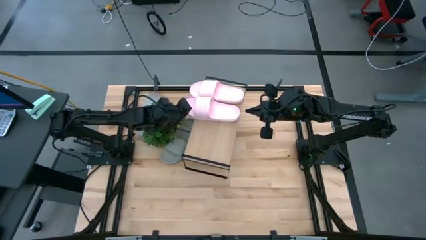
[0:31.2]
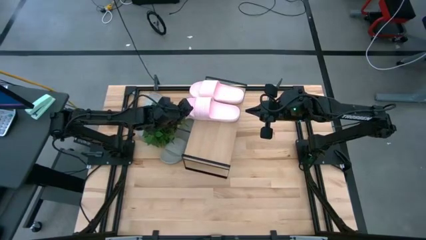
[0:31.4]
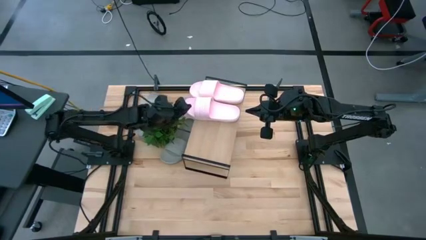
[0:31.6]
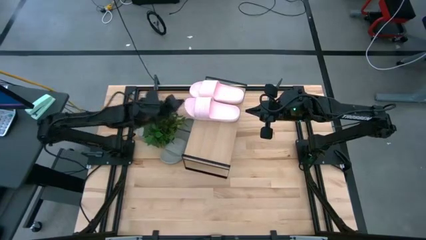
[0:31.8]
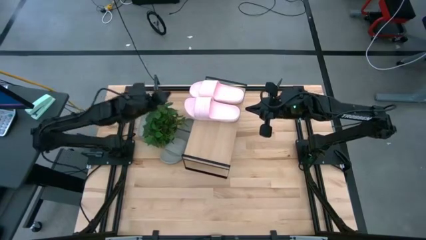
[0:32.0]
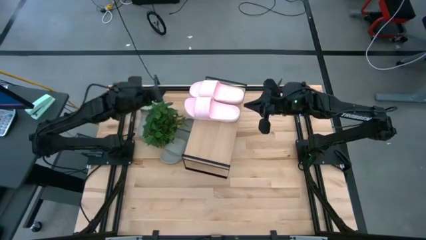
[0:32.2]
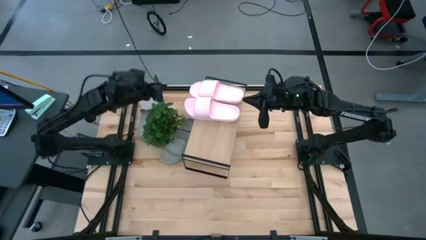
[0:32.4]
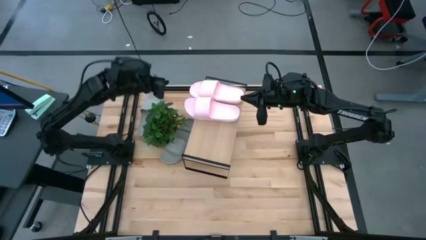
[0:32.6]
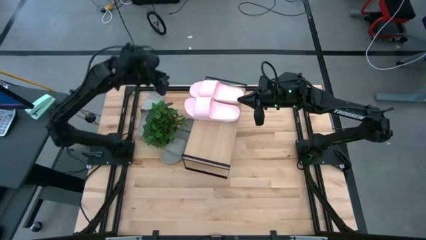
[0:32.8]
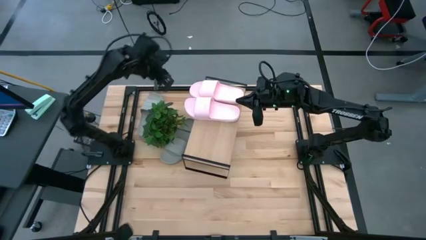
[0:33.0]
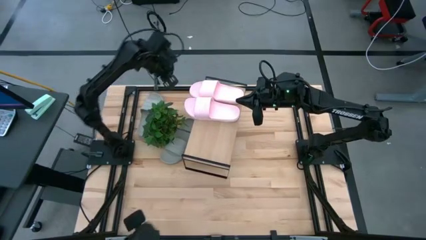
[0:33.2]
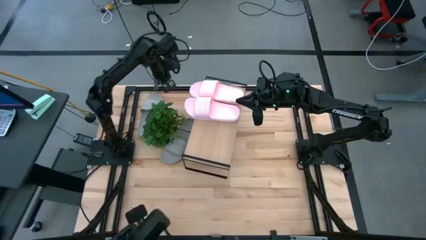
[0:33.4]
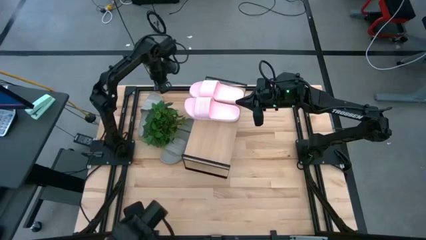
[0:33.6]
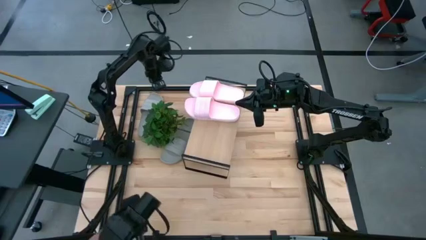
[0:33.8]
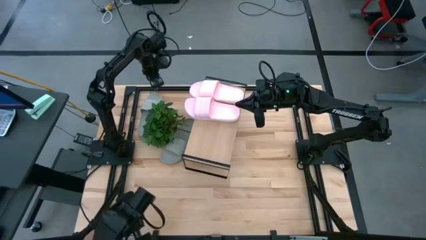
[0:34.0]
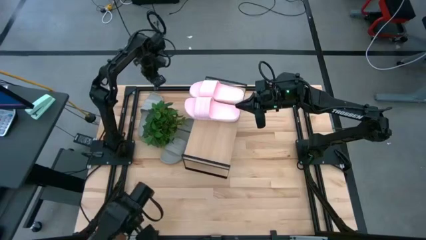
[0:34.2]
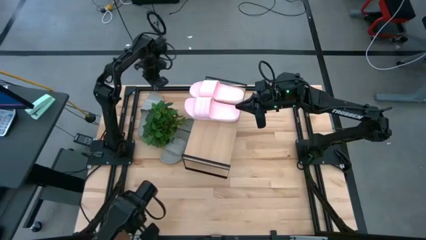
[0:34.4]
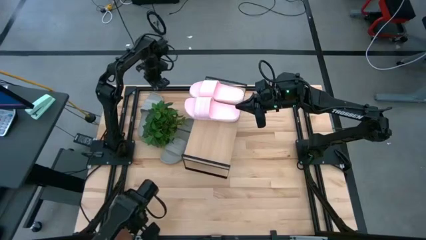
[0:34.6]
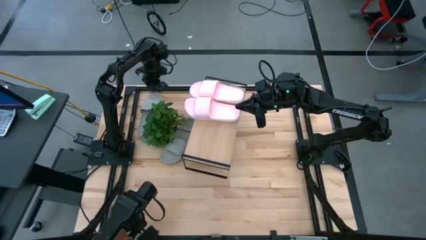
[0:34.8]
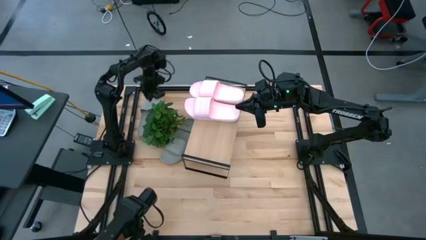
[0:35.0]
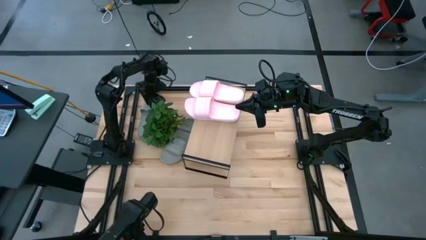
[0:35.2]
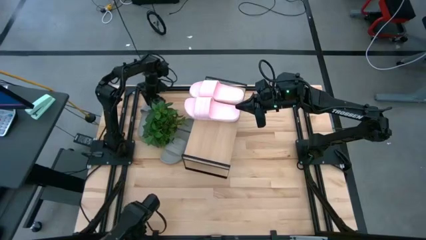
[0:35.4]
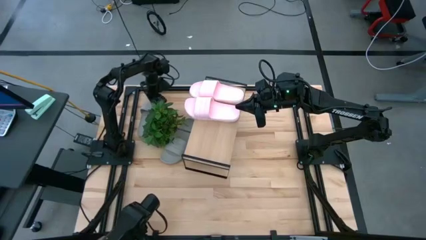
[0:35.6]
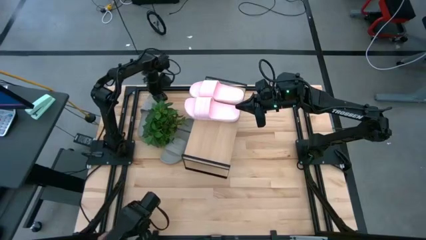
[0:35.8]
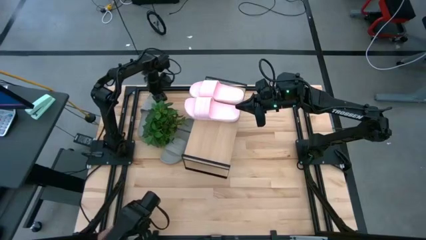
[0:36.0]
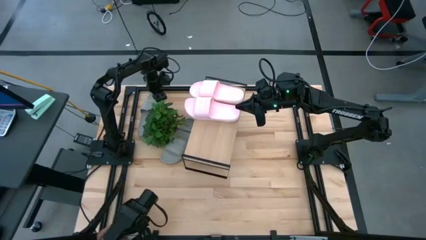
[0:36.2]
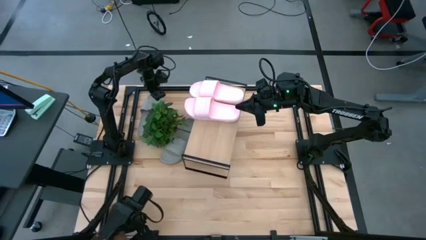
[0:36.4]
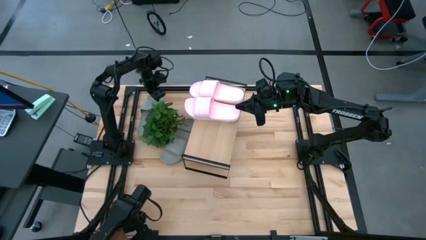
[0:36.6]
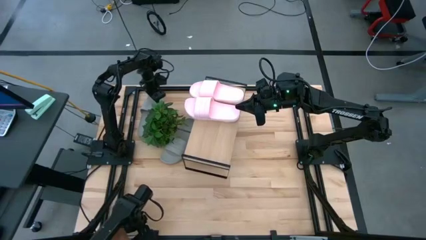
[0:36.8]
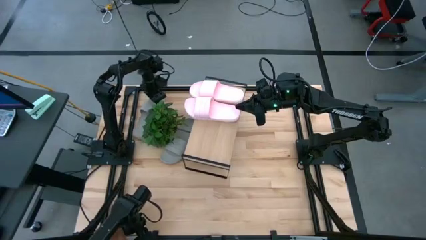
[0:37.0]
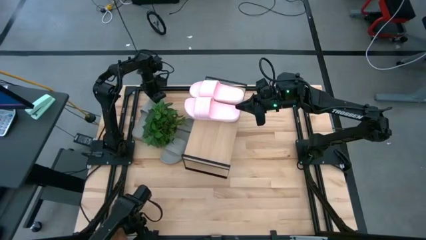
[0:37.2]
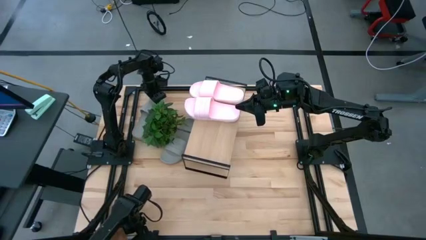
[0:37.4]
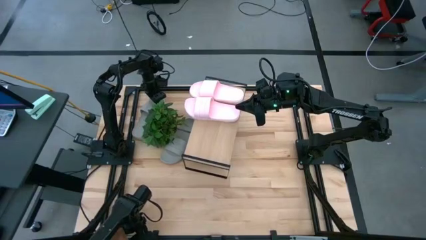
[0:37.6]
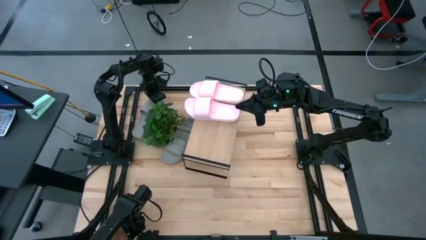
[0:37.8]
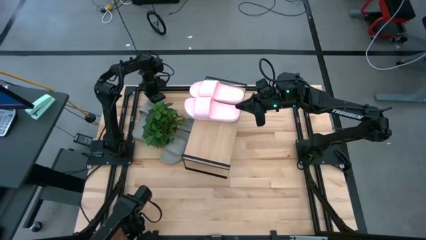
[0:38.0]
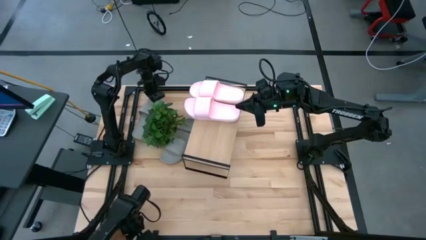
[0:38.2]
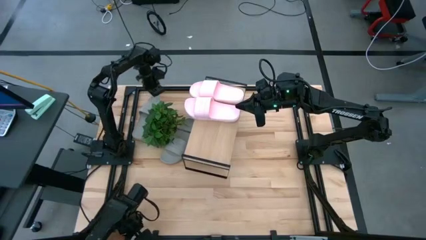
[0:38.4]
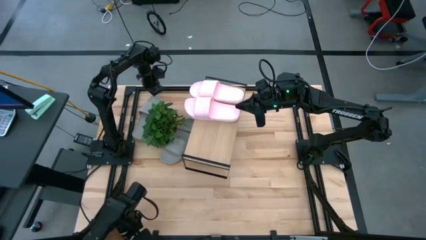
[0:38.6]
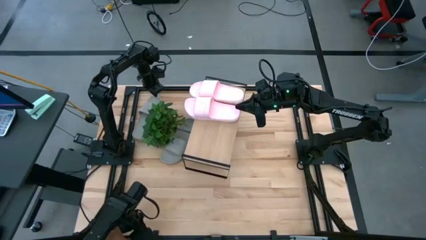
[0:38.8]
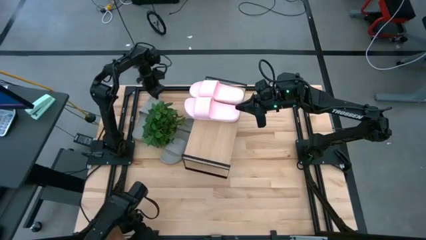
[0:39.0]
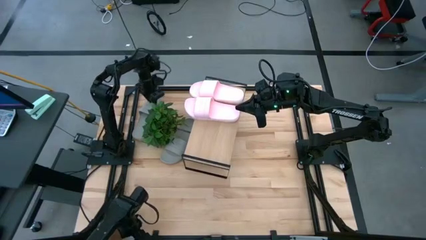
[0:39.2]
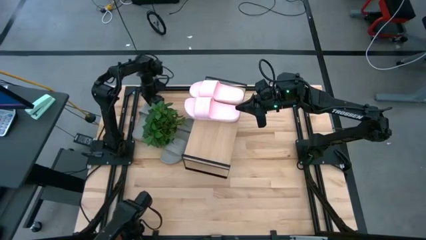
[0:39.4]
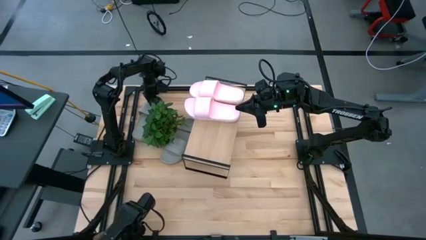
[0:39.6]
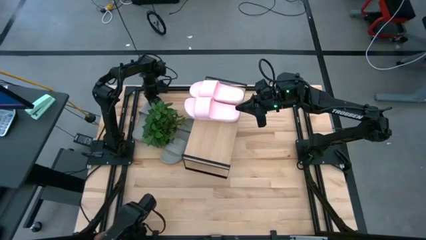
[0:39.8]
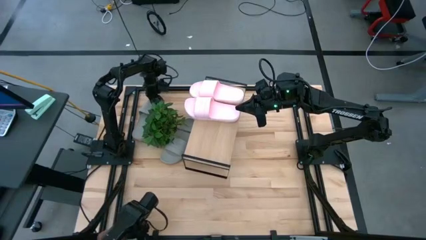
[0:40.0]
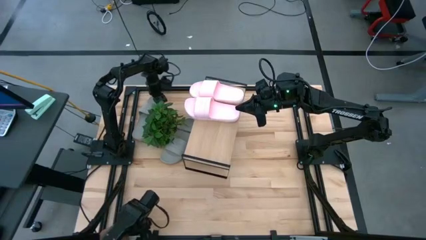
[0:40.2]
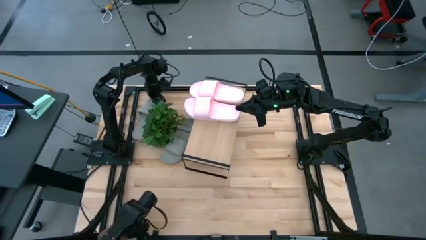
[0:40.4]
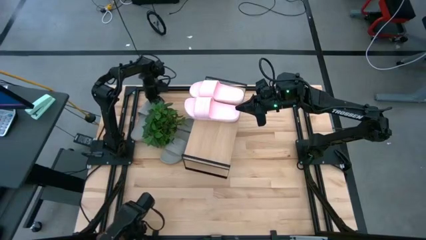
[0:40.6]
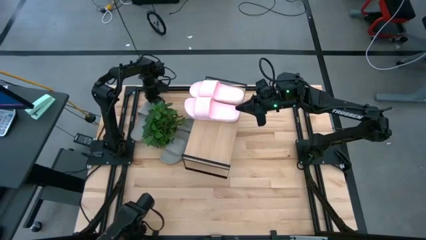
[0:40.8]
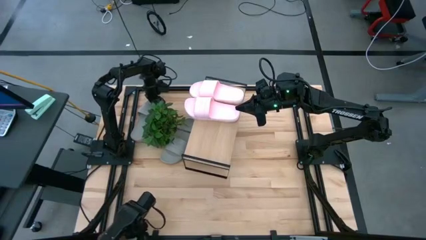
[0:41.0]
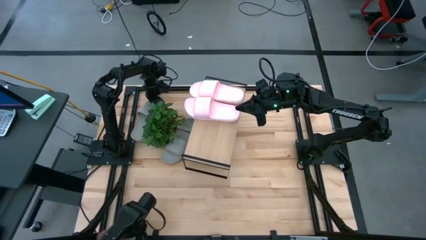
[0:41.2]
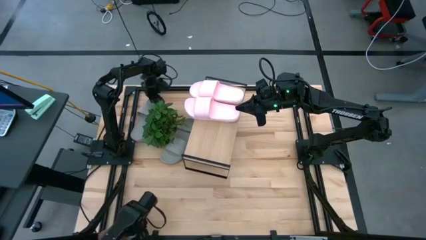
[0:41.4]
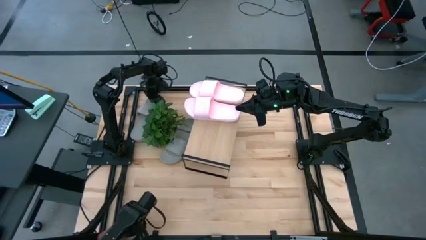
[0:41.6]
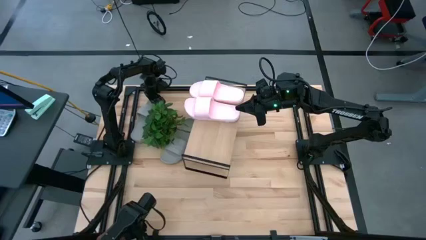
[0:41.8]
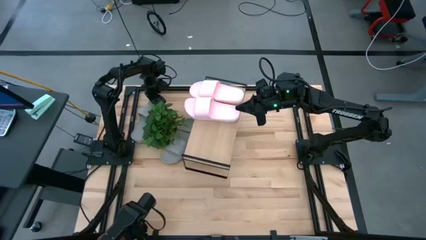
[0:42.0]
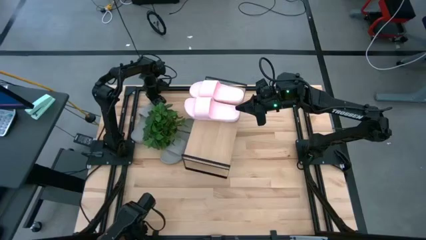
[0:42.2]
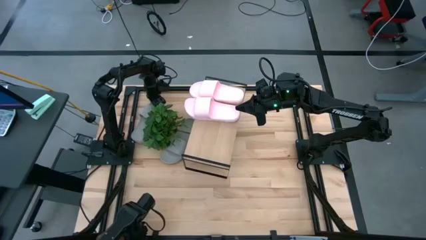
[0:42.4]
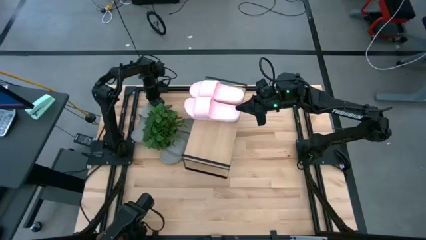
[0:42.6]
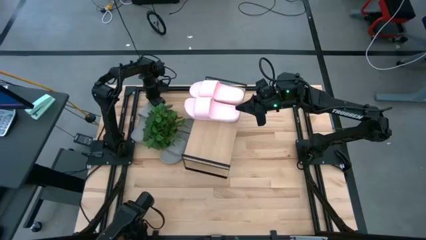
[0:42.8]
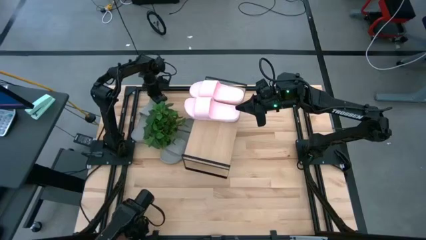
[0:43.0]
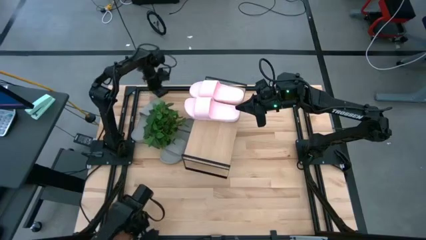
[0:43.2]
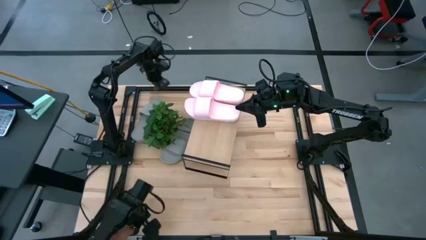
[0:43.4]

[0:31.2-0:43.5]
Task: Pick and place slides into the shelf
Put the left gray slide on the shelf
